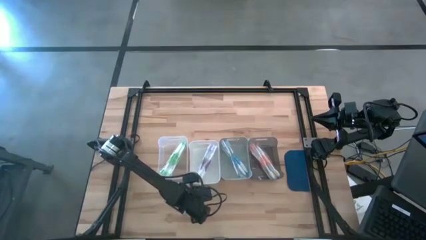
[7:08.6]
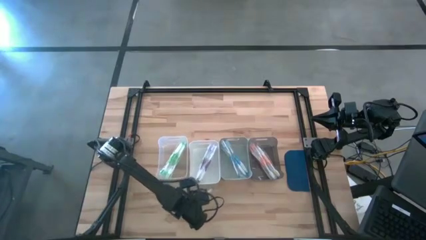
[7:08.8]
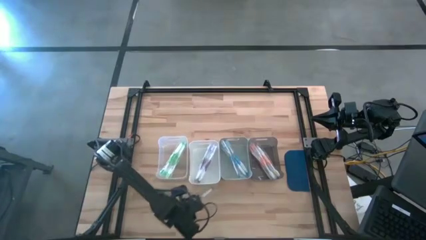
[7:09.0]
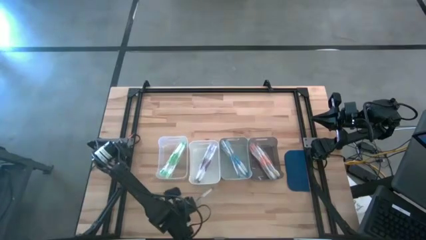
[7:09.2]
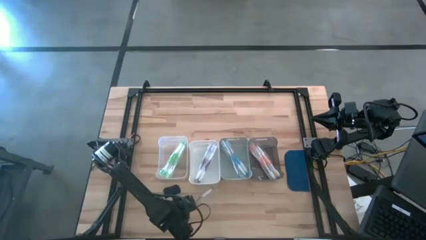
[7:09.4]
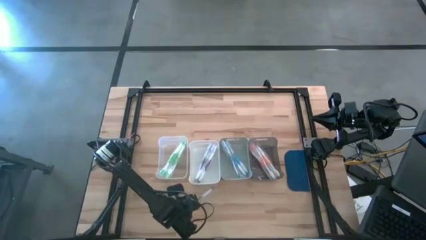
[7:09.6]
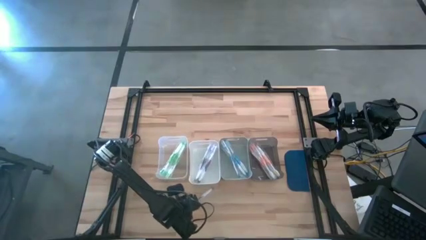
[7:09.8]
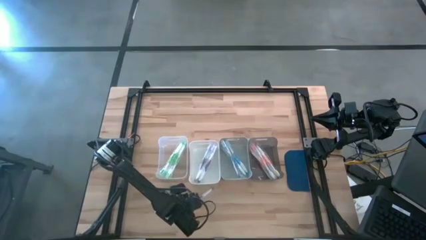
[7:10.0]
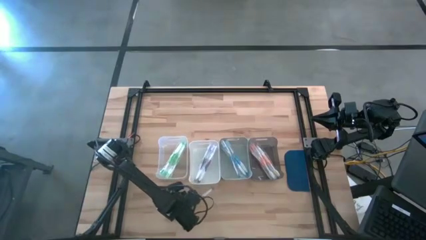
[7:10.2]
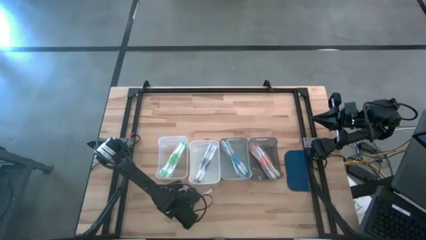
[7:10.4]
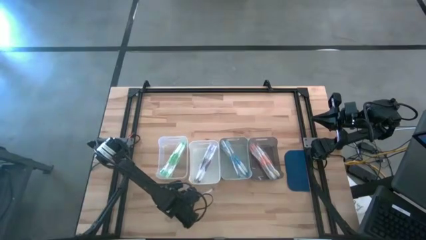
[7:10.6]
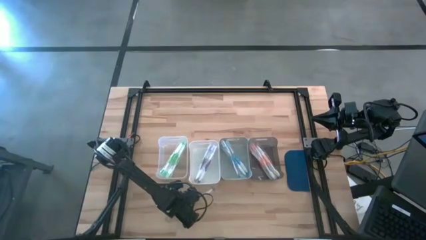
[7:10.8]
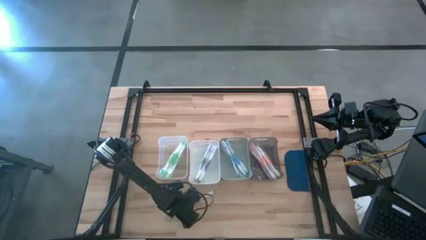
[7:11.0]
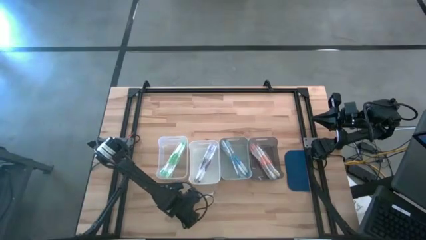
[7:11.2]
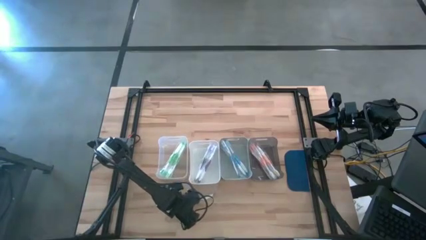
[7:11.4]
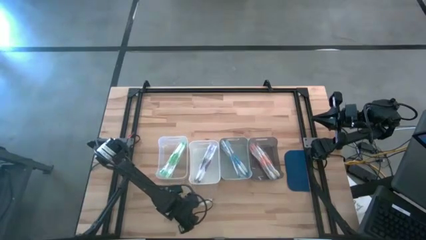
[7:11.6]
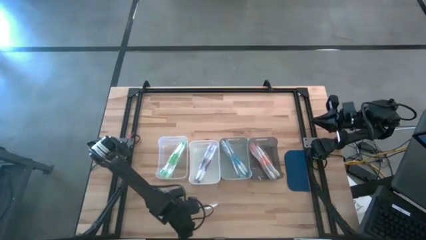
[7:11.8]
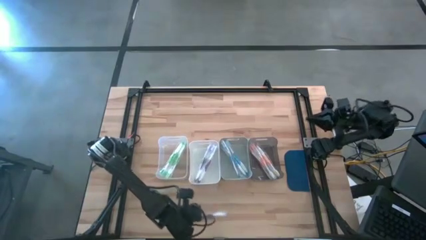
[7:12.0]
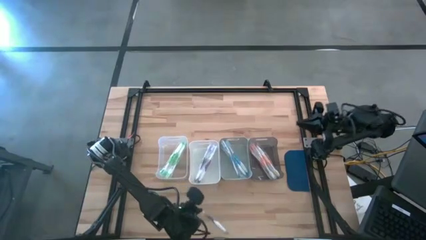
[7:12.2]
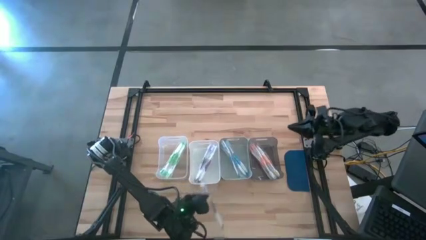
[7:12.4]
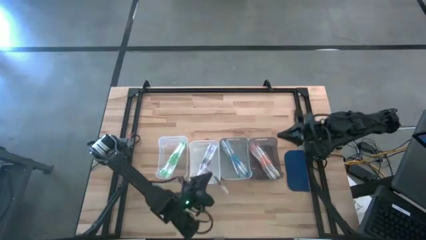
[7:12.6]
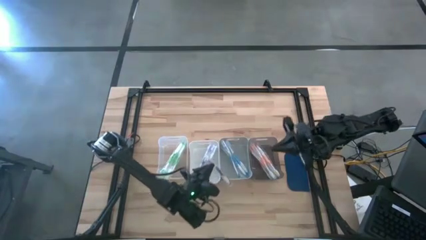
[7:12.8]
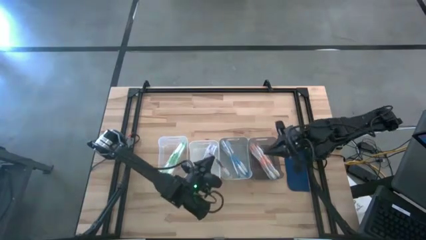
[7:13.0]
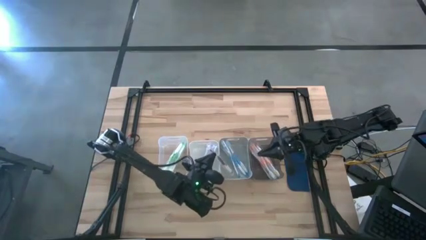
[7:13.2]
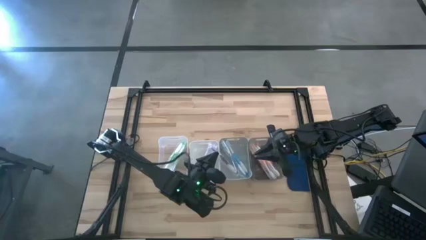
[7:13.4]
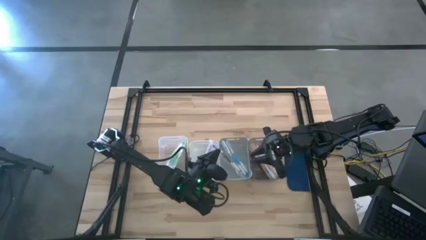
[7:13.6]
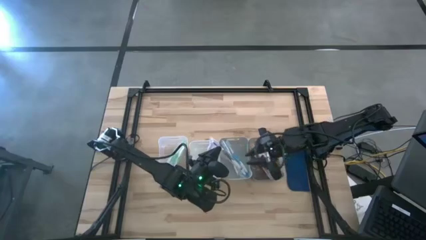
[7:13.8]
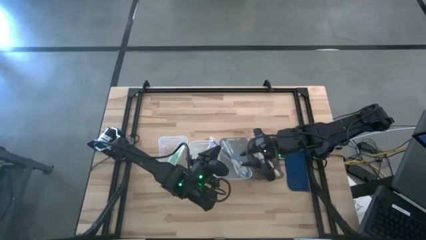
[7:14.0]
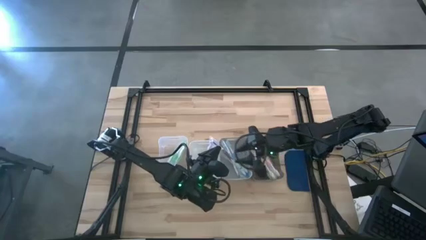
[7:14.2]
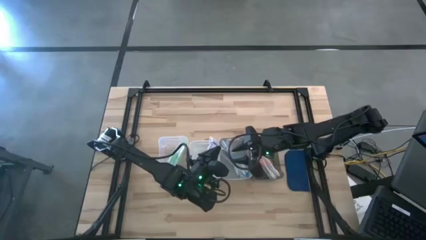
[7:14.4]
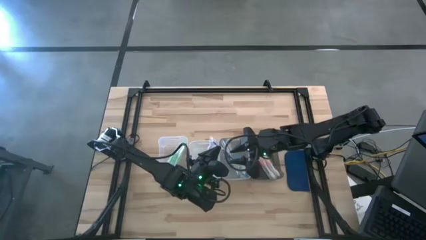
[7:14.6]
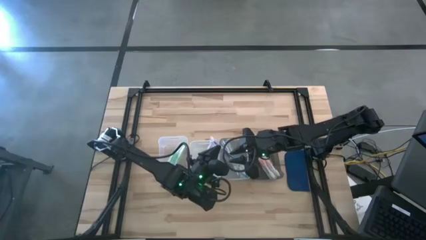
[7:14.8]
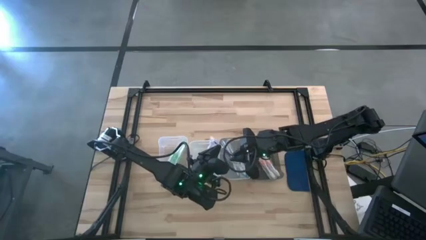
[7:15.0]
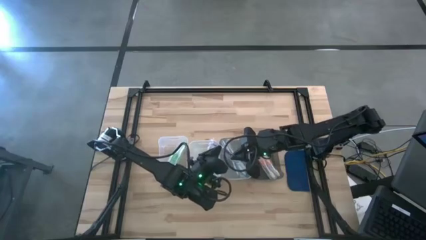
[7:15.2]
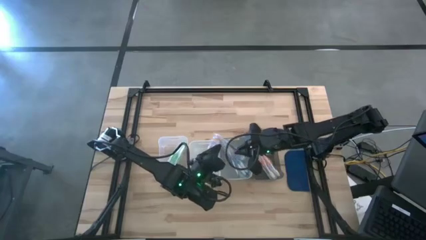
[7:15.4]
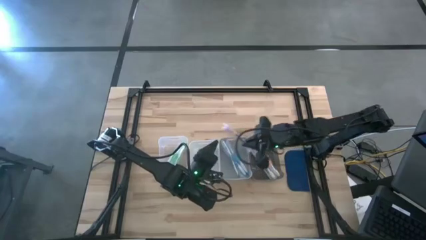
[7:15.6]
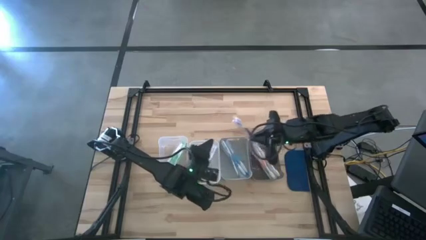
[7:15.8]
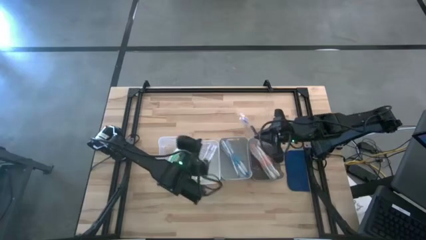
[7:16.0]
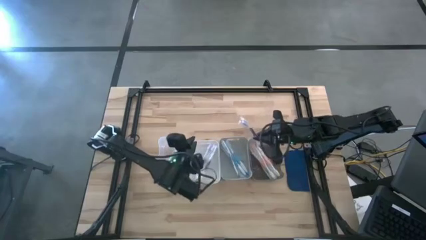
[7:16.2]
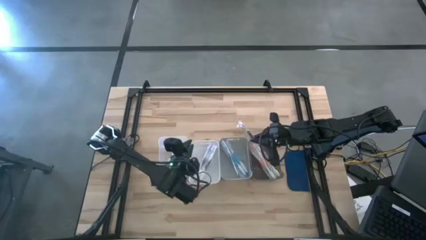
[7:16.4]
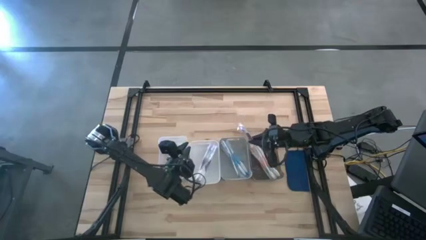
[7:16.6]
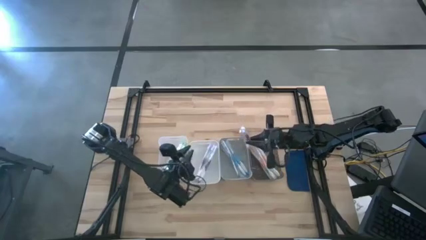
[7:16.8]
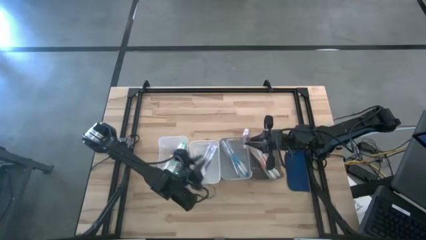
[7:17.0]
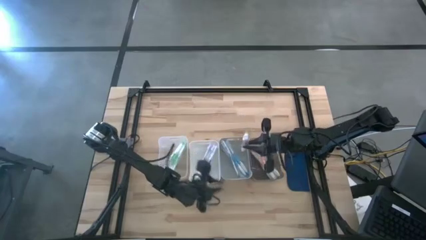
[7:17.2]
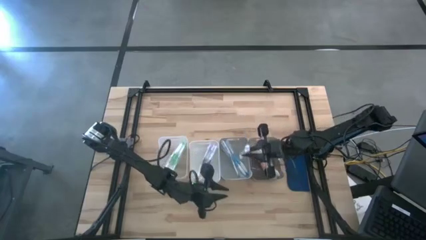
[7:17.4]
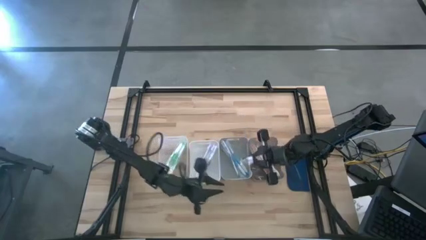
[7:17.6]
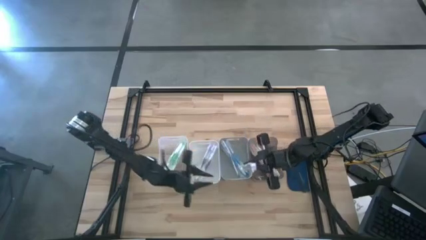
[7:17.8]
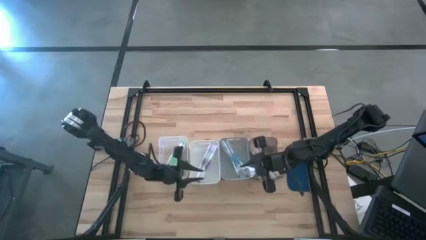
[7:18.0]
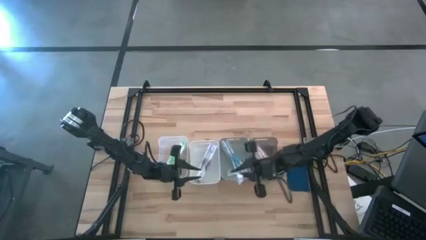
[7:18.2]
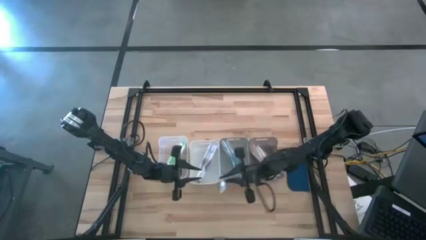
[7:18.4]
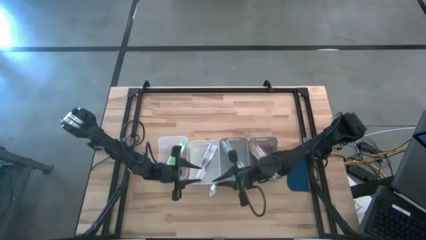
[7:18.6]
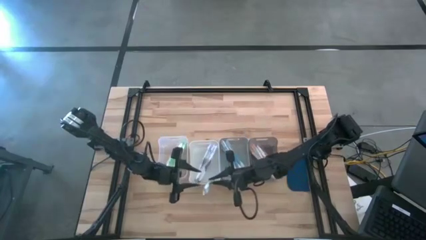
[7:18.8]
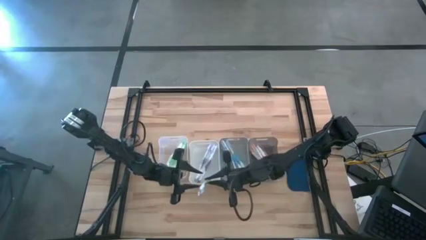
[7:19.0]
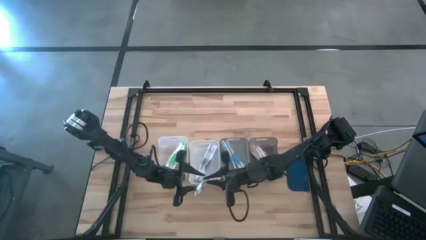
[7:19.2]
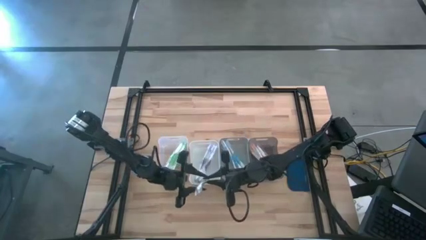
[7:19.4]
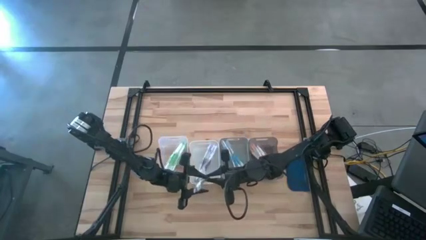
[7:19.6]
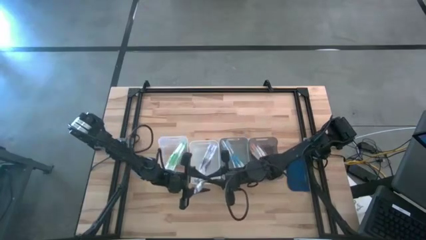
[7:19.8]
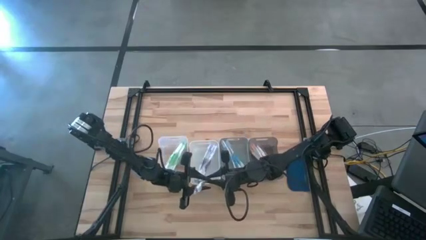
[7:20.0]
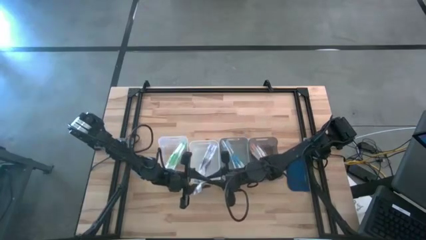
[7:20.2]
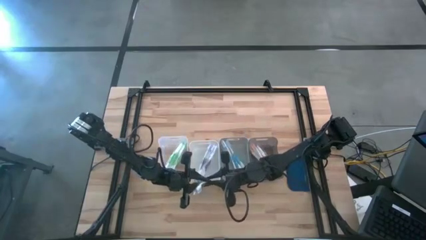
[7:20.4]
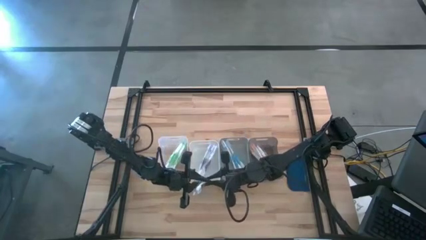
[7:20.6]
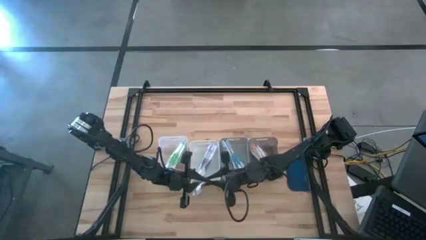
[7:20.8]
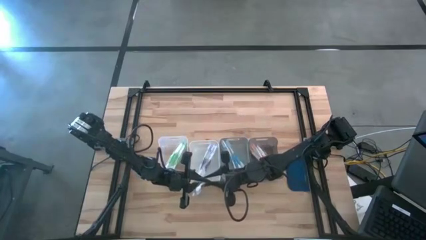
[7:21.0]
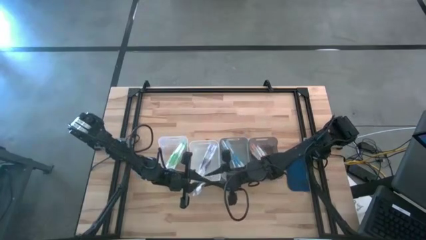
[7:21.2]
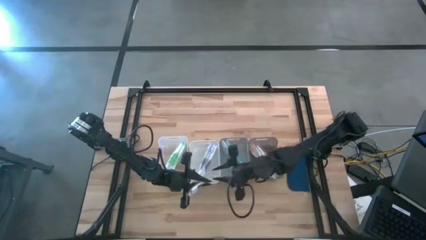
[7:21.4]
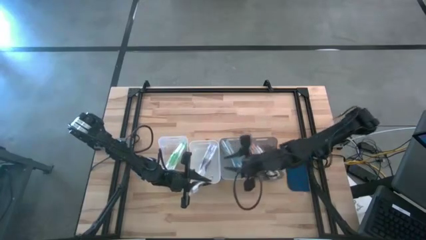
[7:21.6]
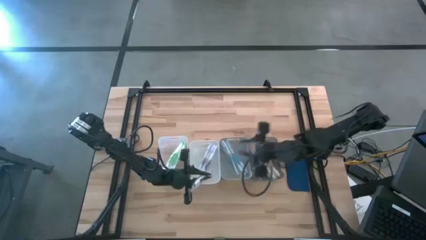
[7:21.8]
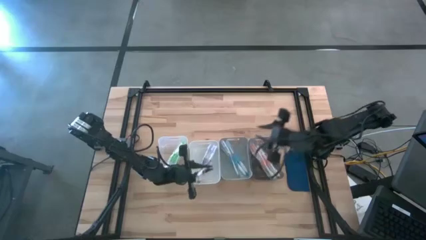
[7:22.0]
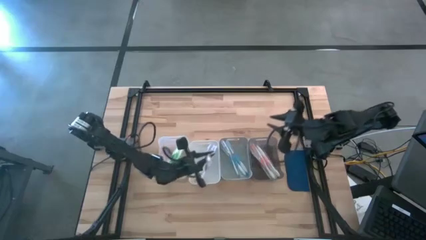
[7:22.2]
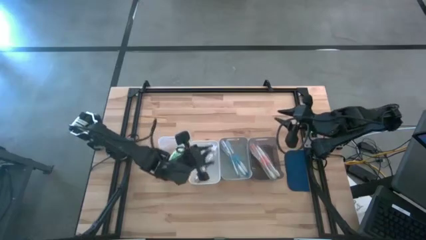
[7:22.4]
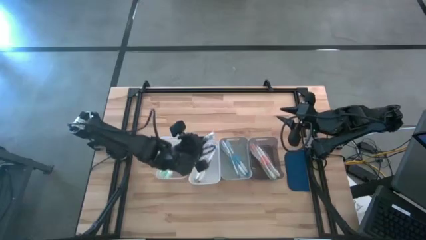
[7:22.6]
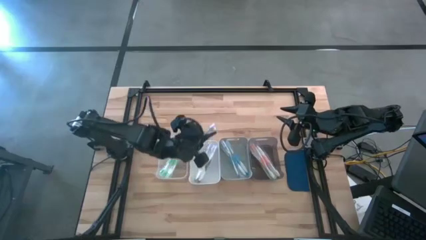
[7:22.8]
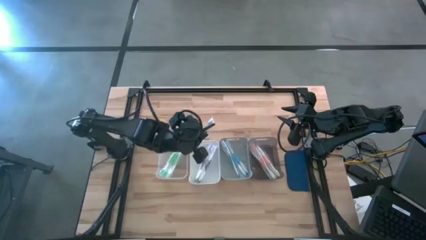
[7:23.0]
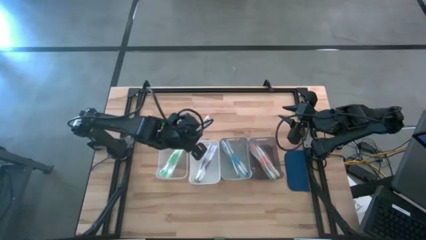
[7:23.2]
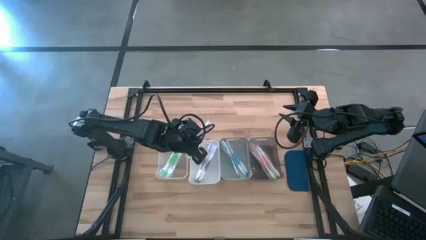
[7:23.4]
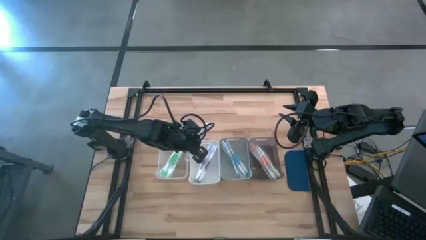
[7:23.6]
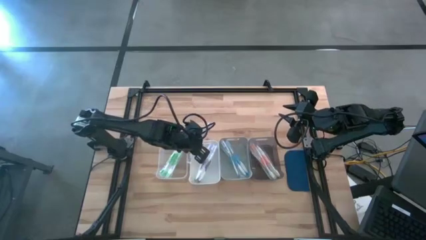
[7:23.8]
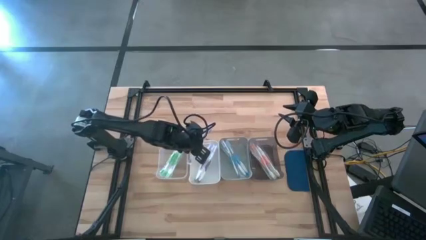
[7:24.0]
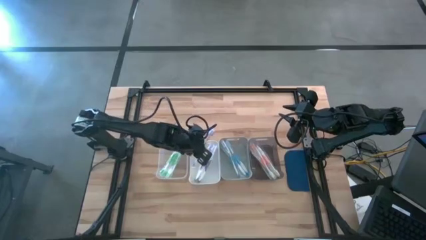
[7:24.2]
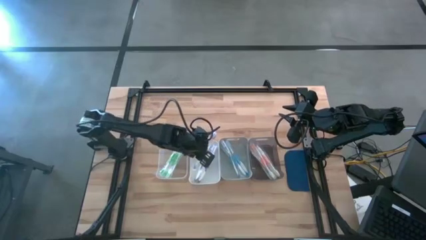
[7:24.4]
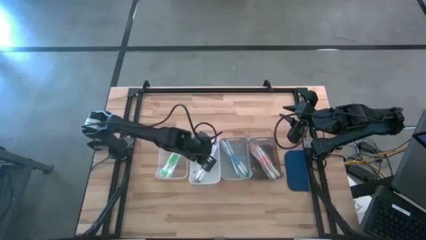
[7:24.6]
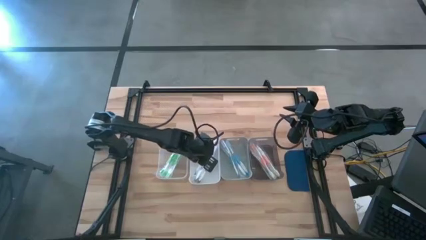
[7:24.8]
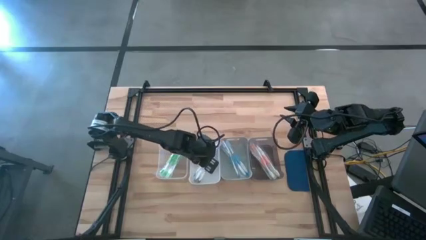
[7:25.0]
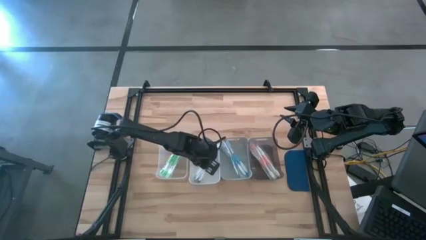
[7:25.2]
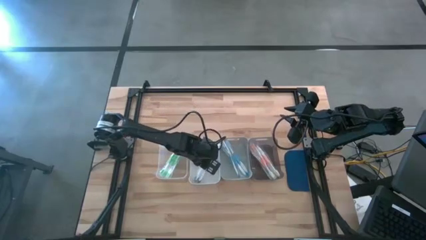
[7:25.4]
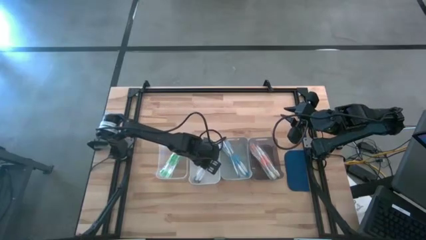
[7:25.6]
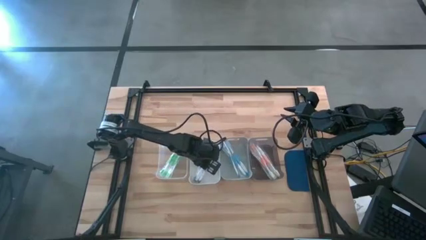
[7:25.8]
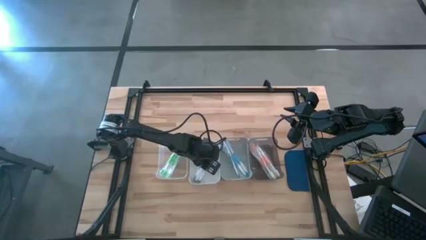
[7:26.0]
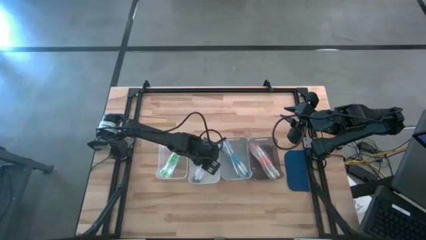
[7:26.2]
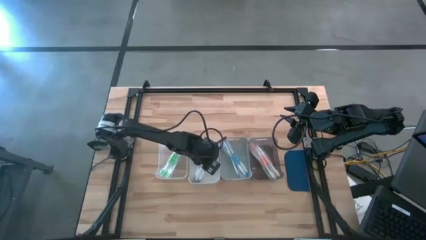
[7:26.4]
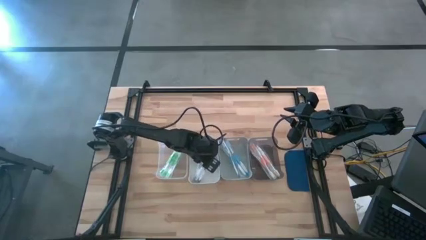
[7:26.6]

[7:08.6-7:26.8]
Task: Pick & Place Toothbrushes
Put the purple toothbrush into the white bin
